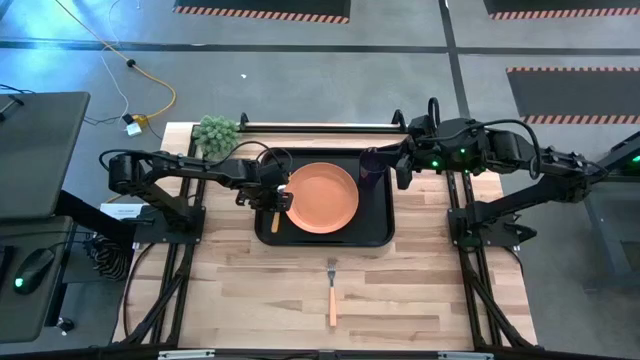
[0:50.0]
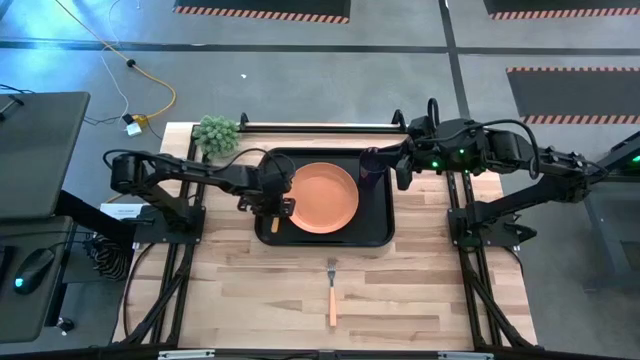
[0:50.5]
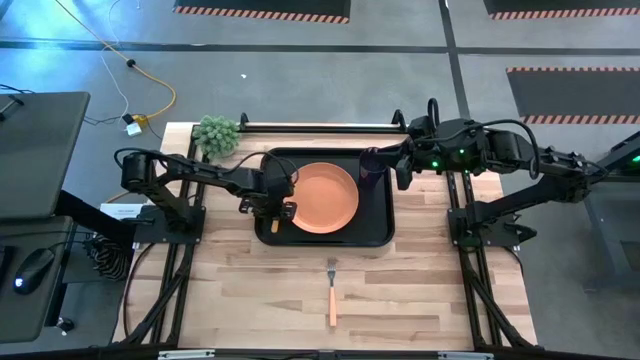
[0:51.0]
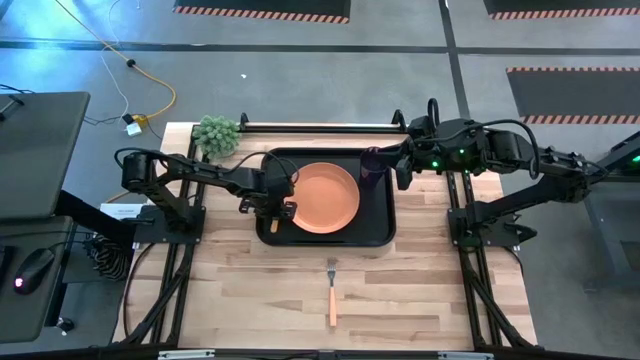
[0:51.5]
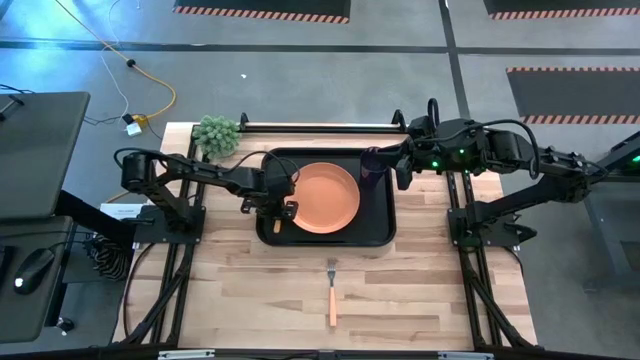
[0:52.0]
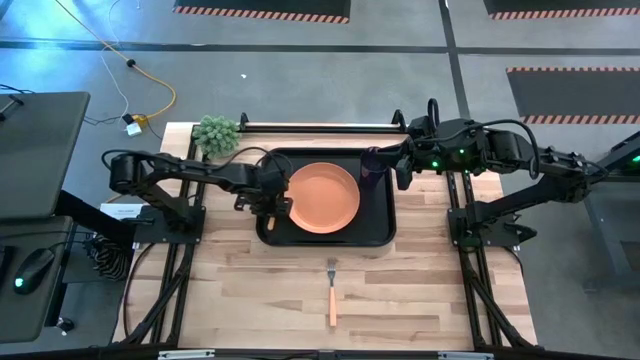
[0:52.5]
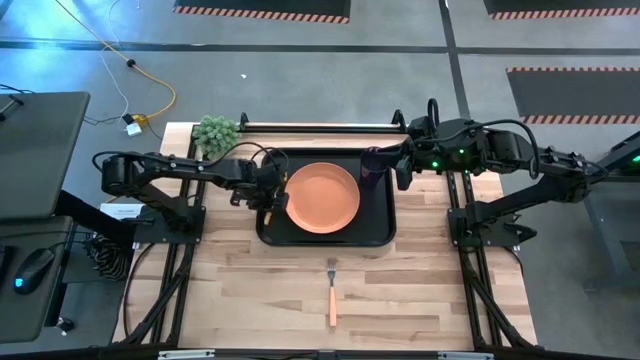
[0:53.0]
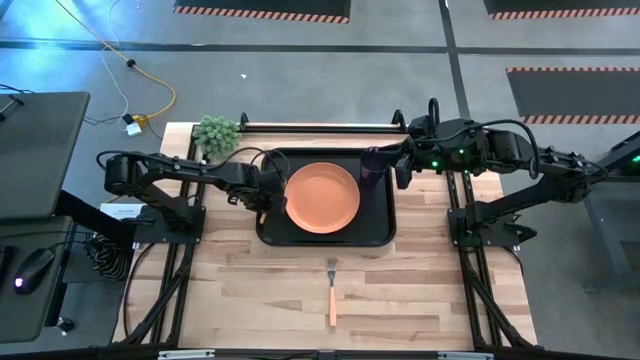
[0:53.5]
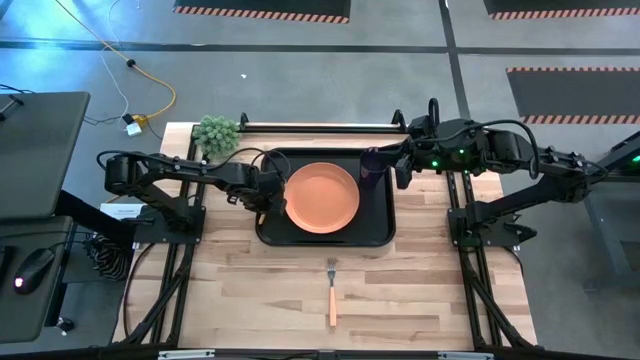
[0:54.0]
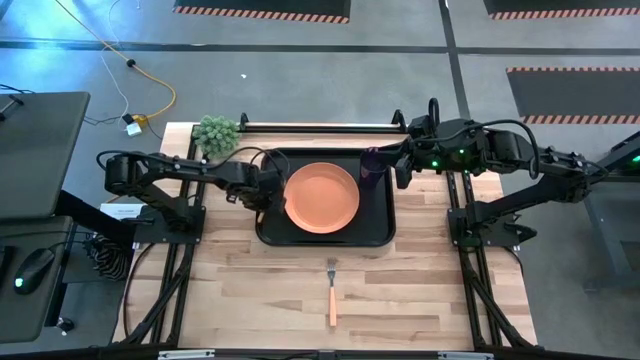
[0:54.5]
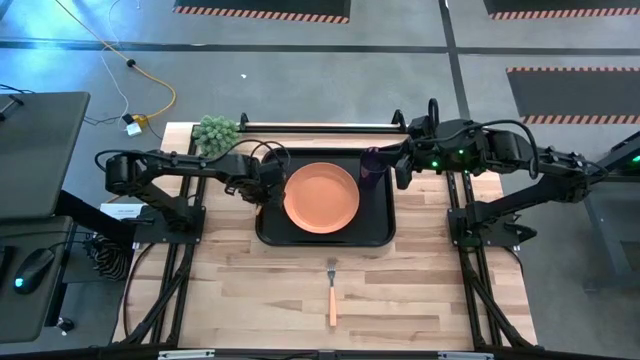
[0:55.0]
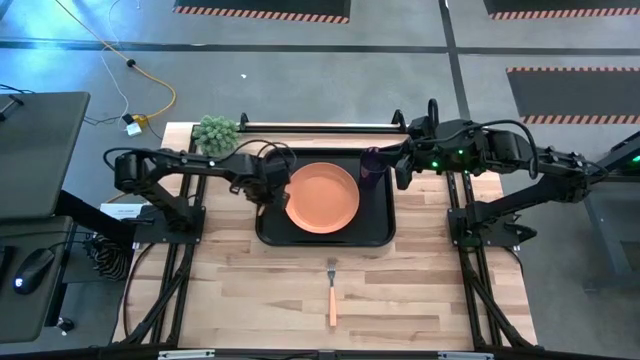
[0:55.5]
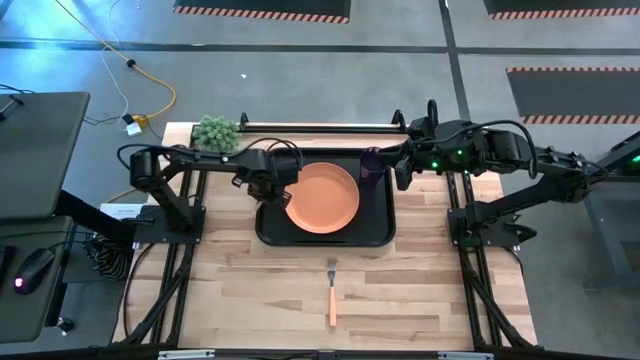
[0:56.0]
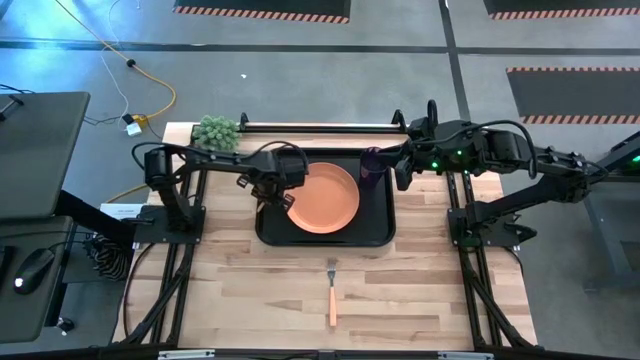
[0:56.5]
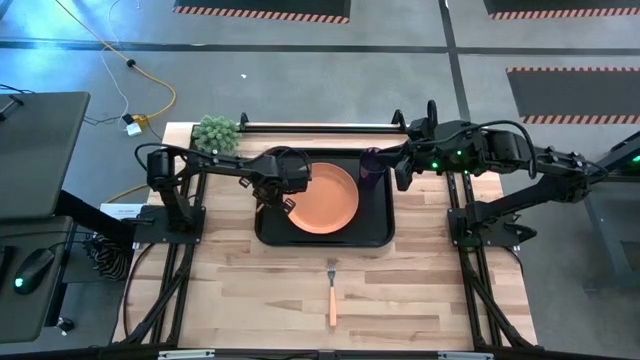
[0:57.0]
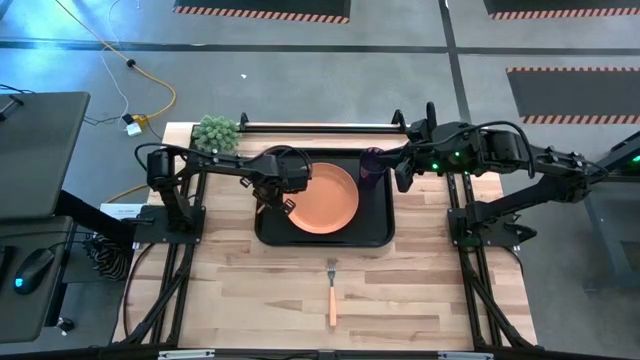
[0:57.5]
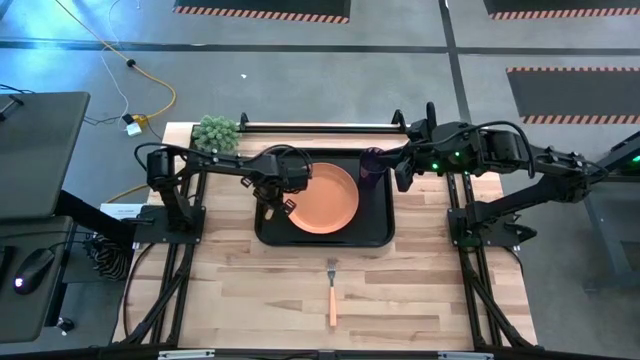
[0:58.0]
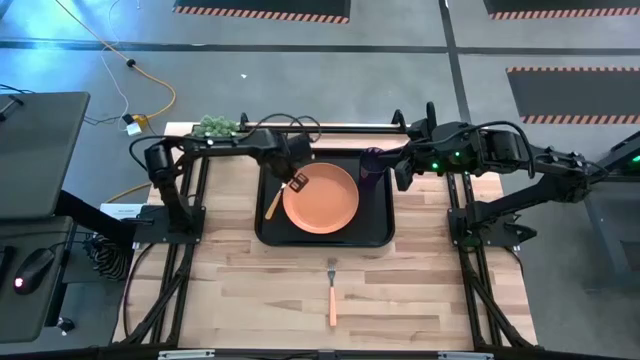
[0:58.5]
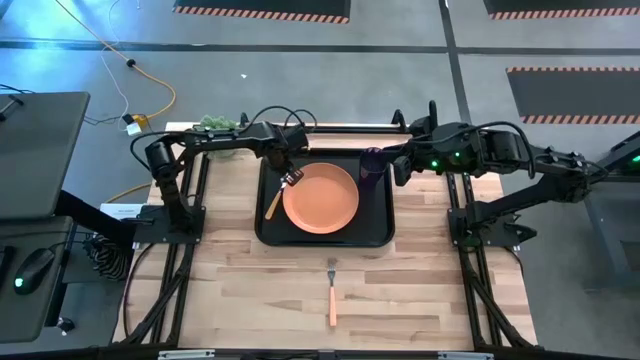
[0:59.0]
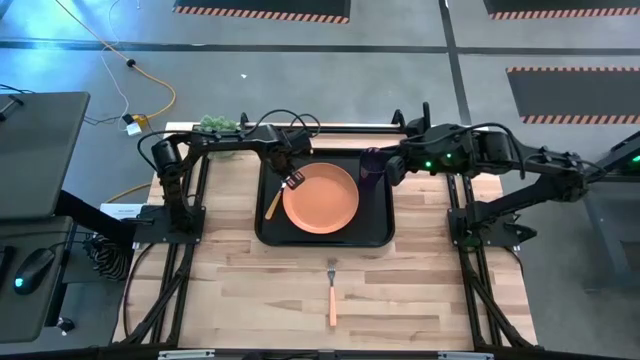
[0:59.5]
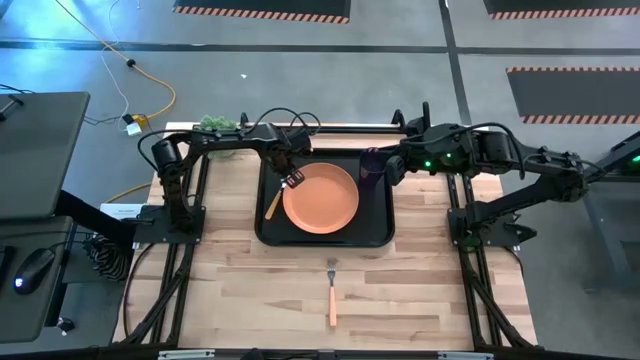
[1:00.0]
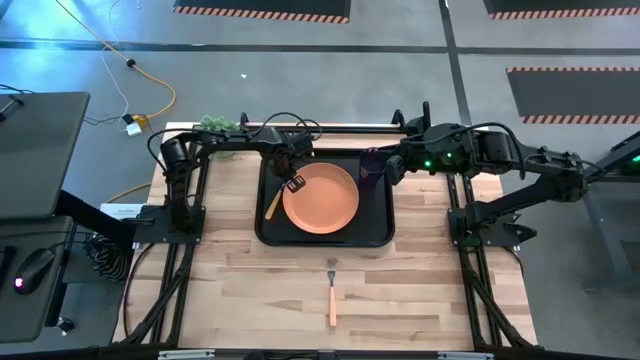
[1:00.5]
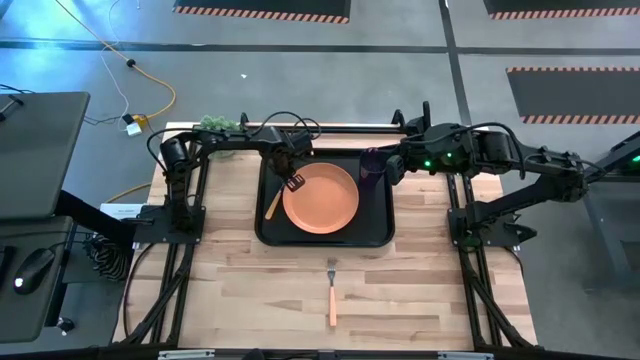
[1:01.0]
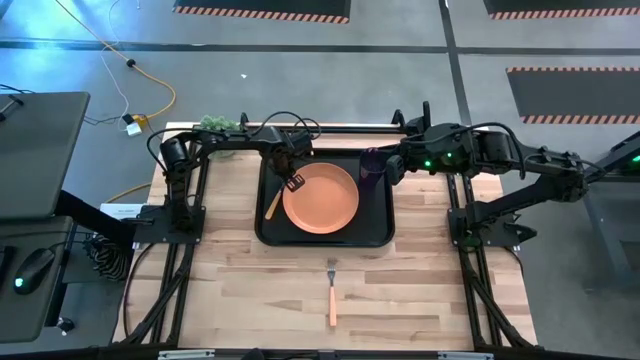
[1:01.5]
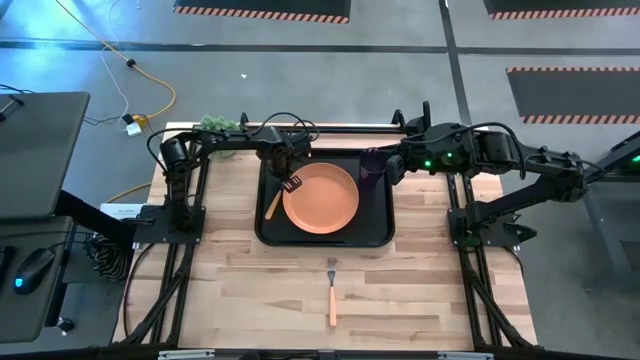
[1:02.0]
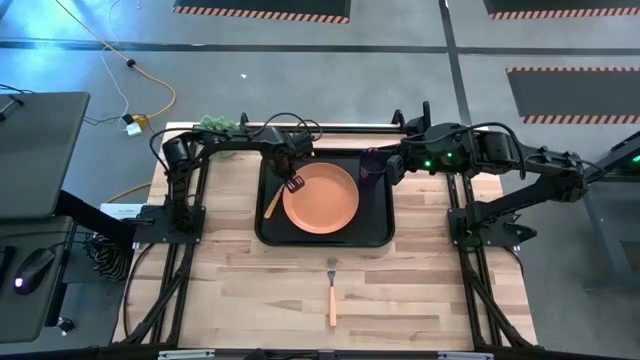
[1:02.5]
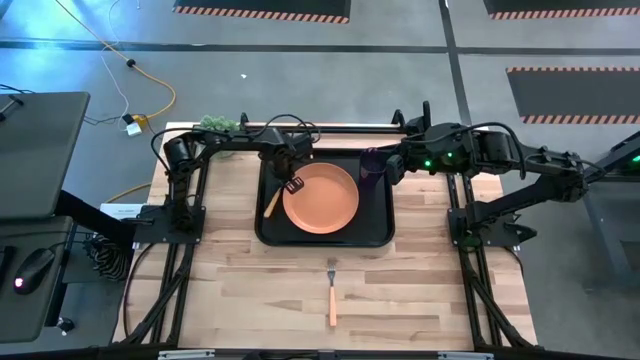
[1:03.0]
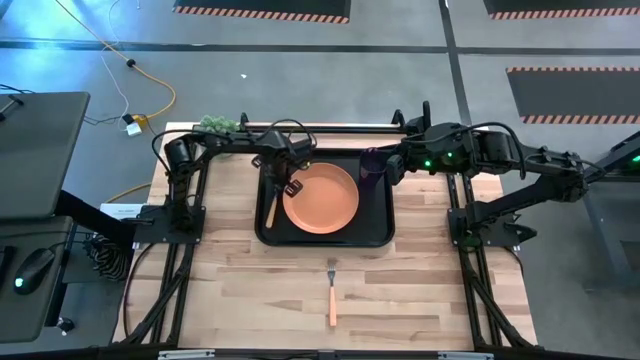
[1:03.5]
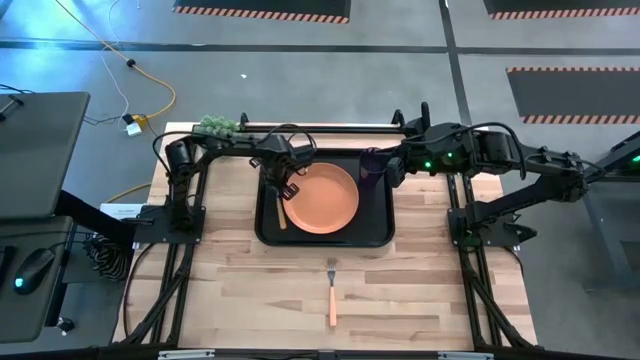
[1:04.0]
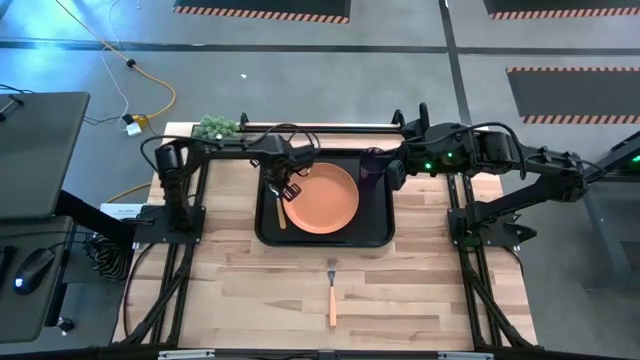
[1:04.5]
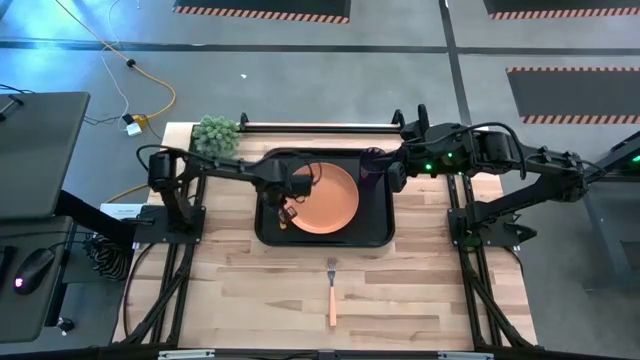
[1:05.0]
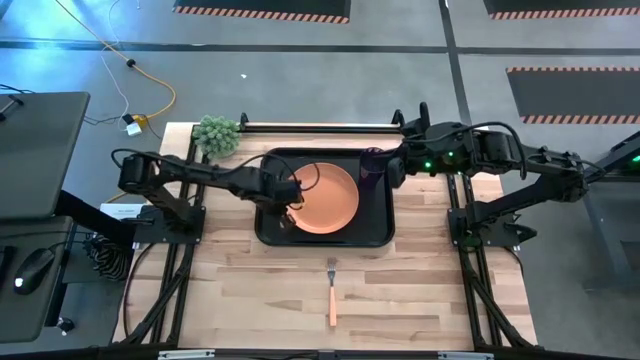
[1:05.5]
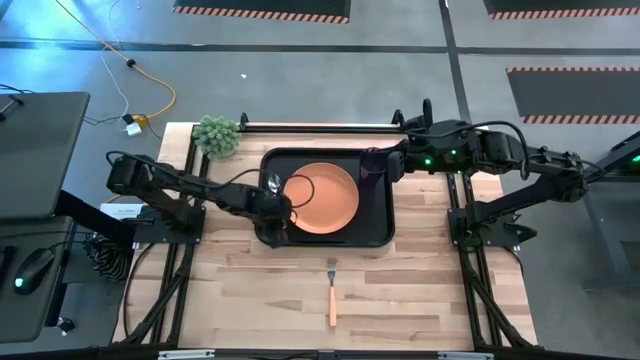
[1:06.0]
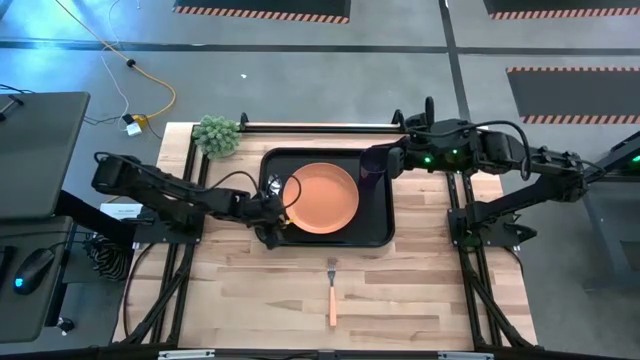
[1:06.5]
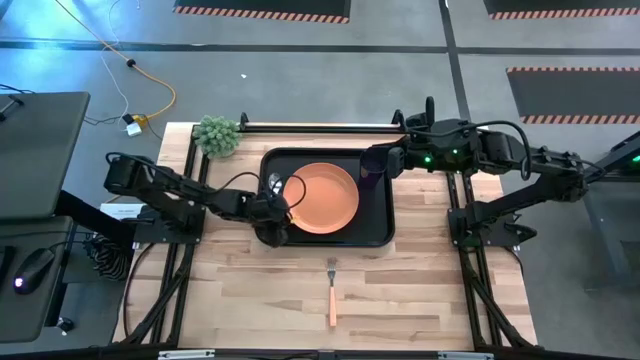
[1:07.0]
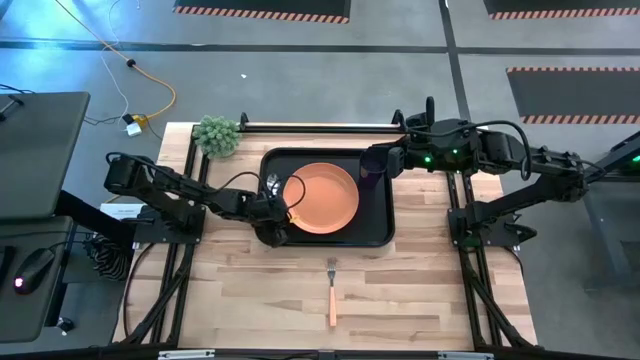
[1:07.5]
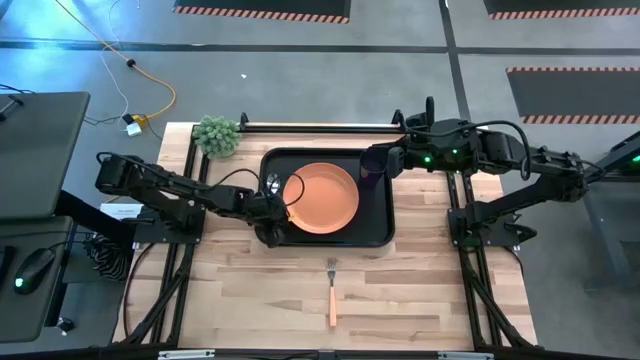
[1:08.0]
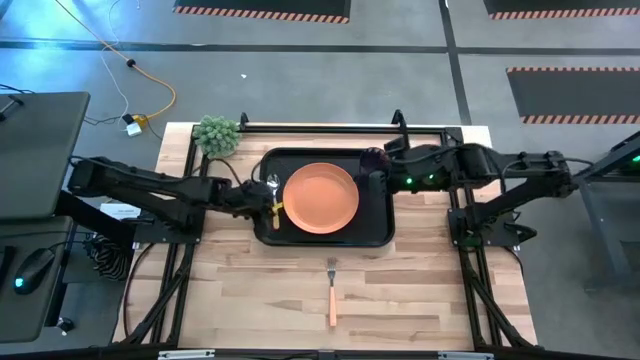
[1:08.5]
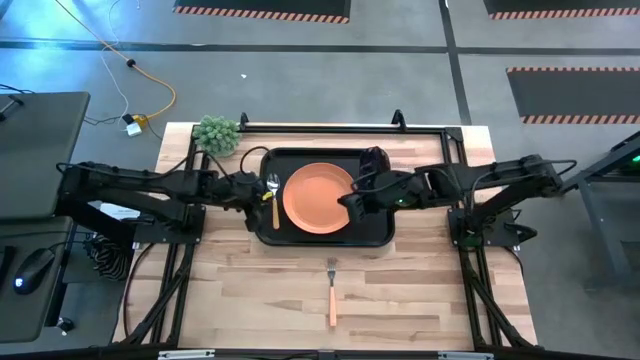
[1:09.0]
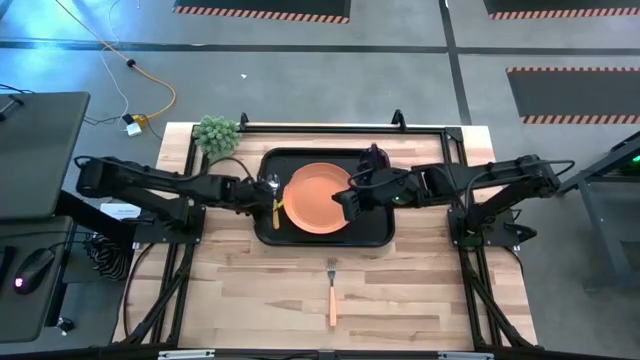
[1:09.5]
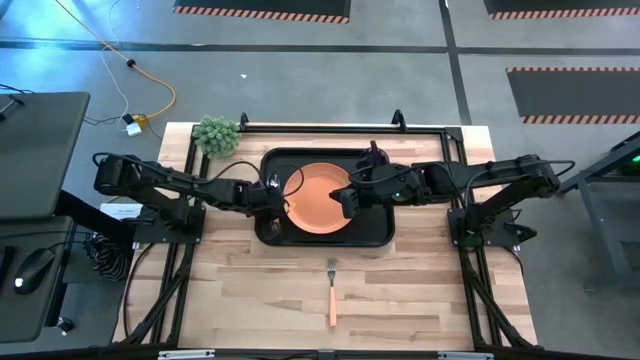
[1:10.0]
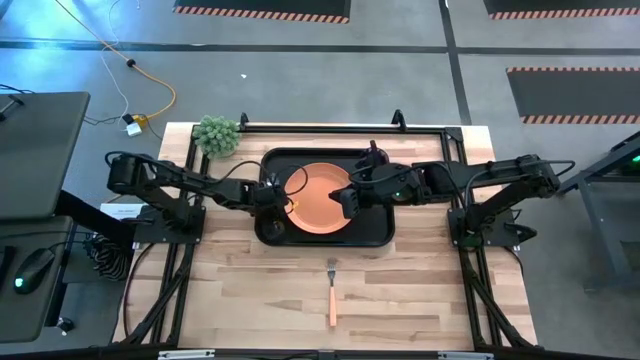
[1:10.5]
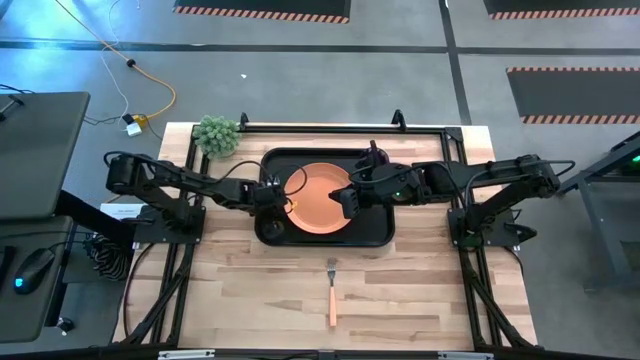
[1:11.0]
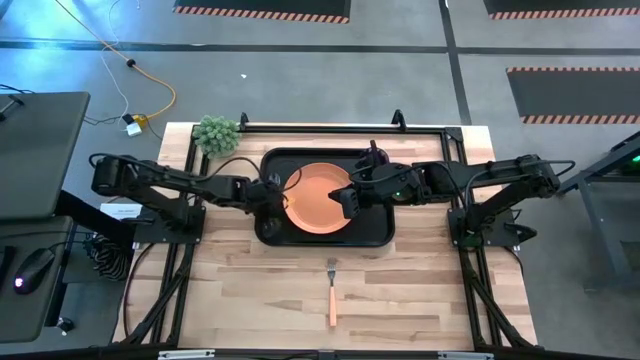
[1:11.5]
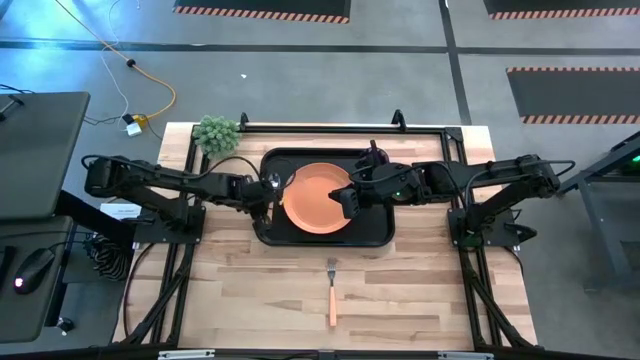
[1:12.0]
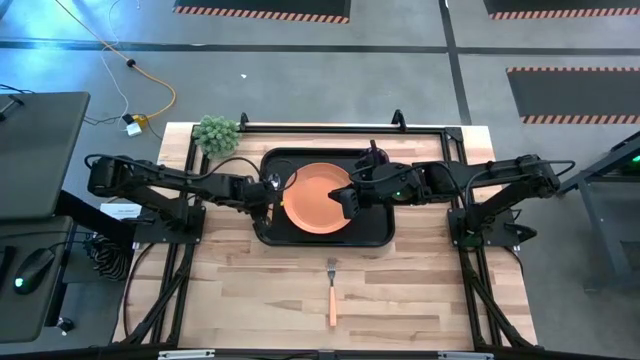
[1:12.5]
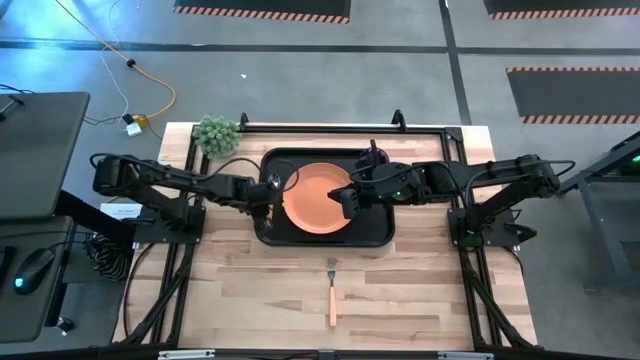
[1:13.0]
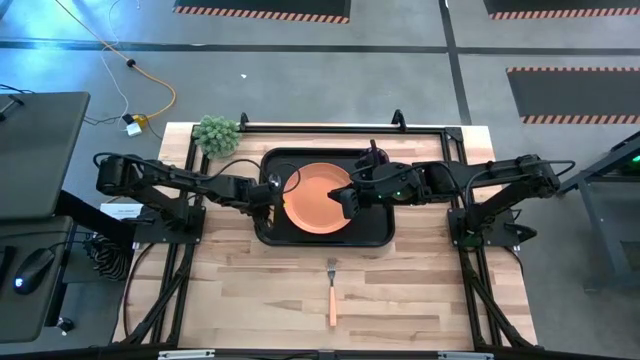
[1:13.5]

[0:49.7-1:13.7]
Task: Pick and place plate/cup/fork/spoon on tray
Put the yellow spoon to the left side of the orange plate on the black serving tray
